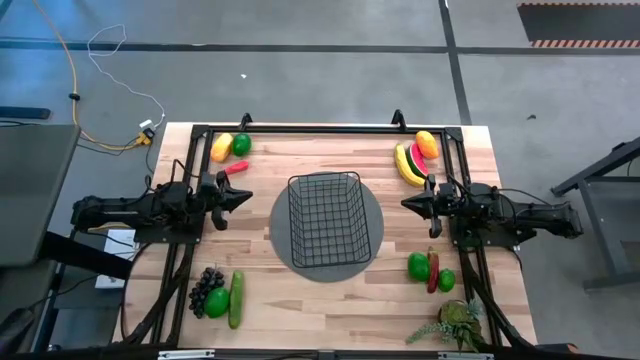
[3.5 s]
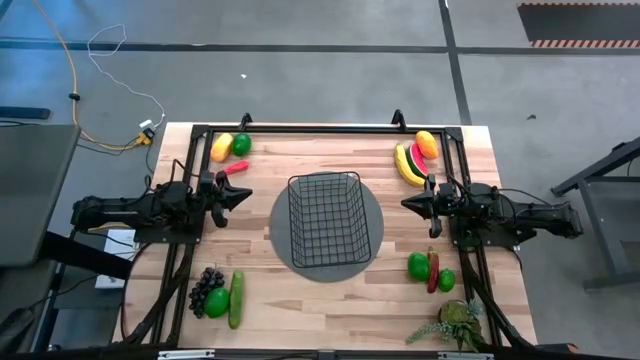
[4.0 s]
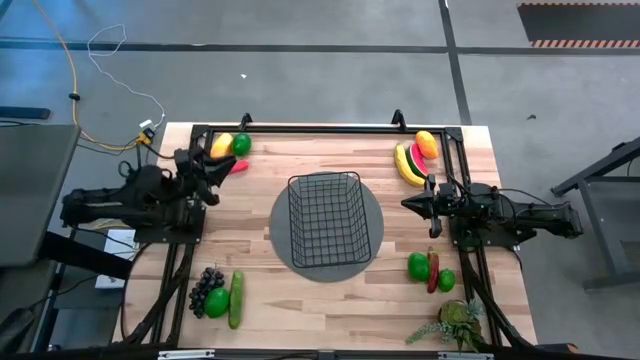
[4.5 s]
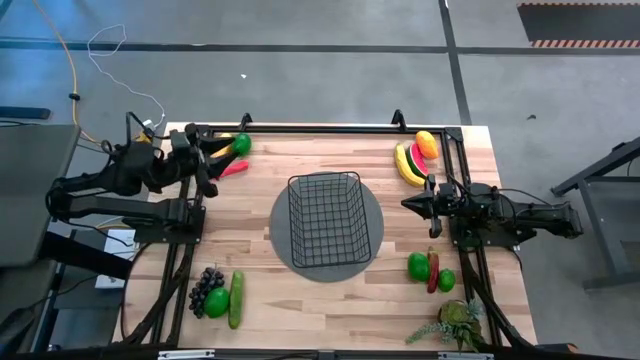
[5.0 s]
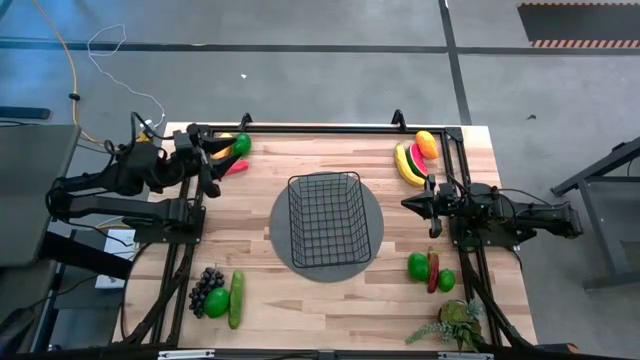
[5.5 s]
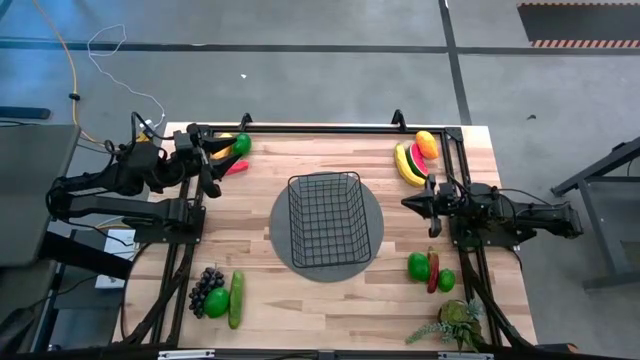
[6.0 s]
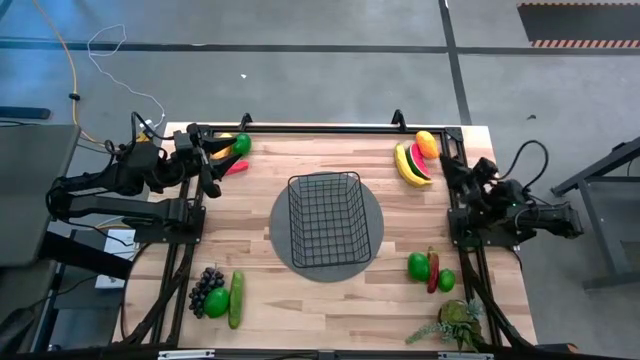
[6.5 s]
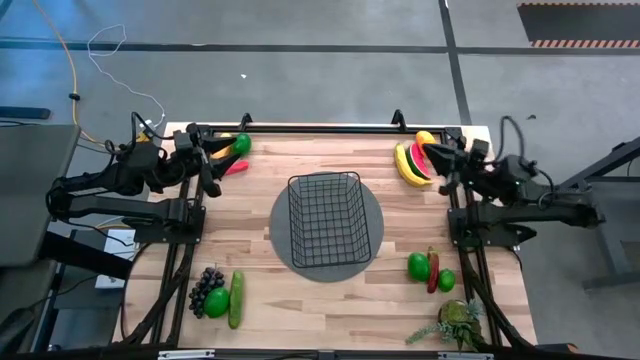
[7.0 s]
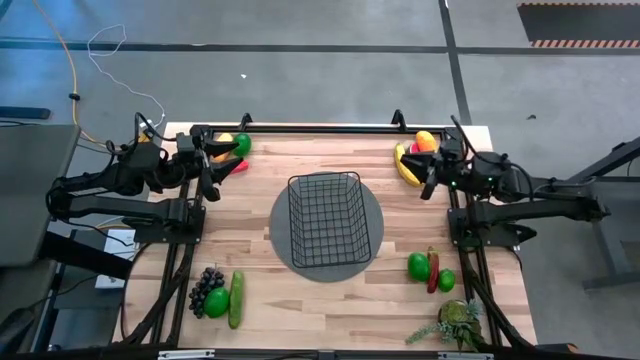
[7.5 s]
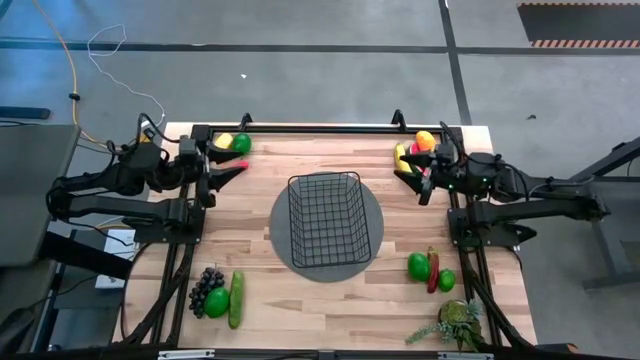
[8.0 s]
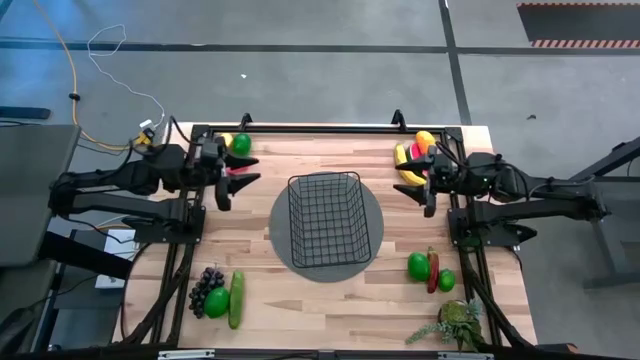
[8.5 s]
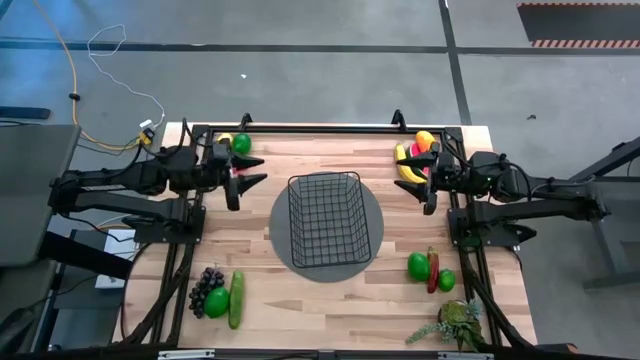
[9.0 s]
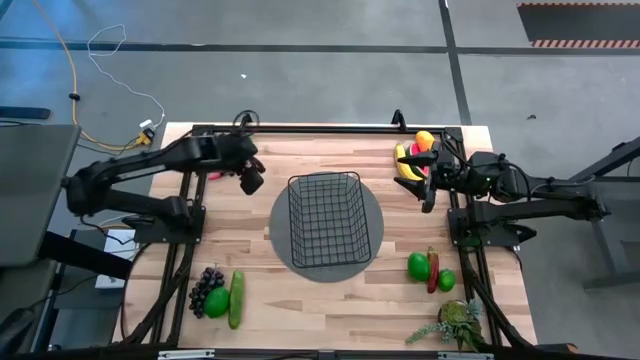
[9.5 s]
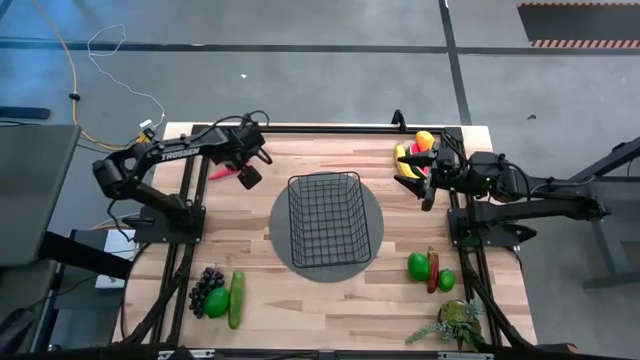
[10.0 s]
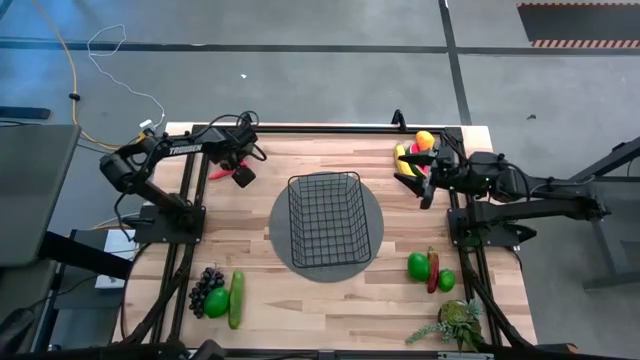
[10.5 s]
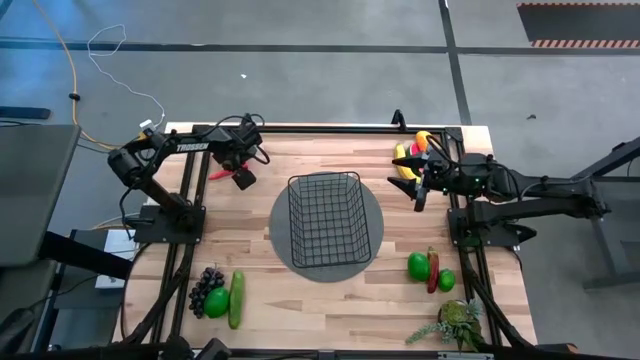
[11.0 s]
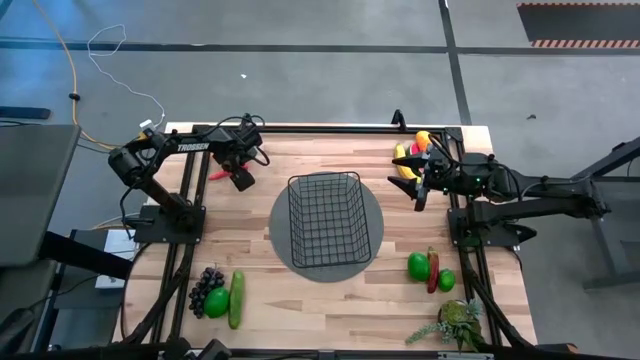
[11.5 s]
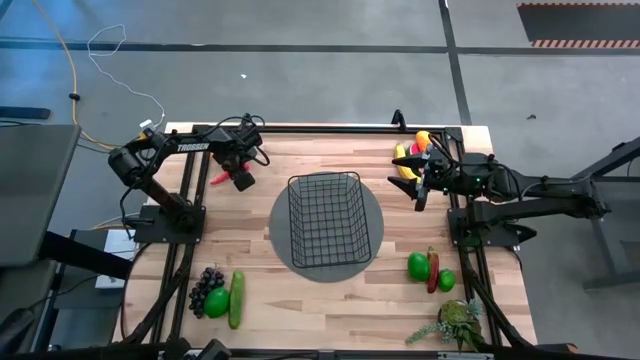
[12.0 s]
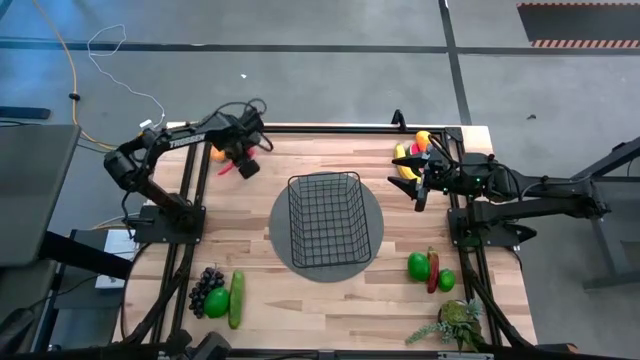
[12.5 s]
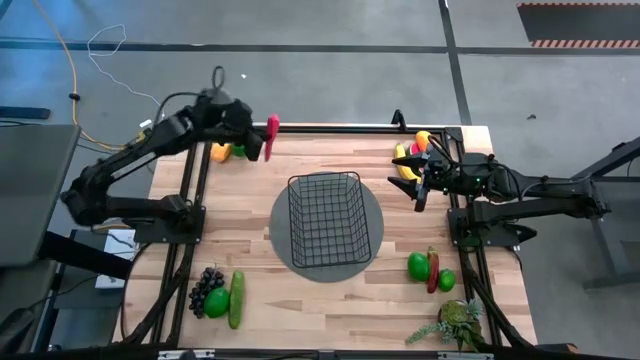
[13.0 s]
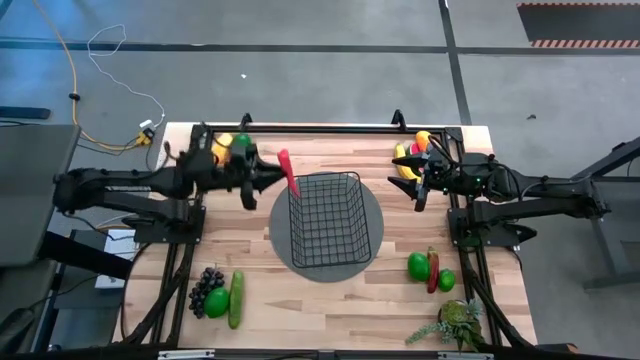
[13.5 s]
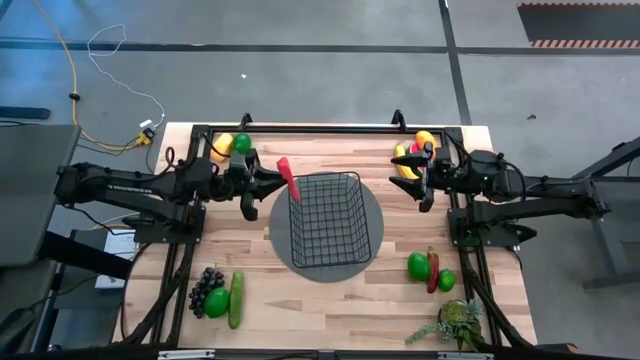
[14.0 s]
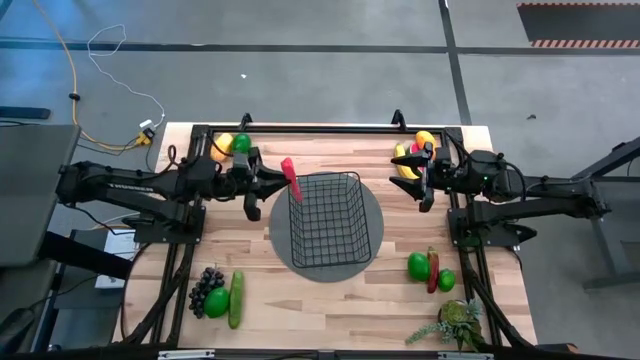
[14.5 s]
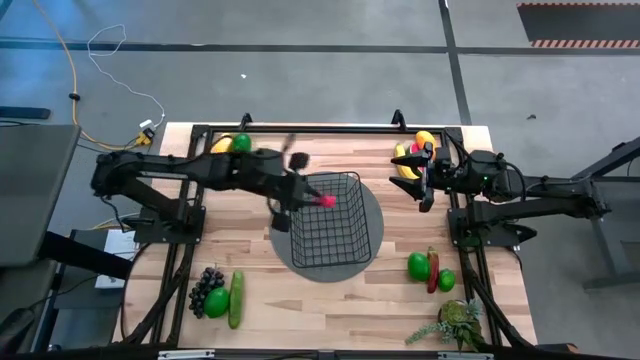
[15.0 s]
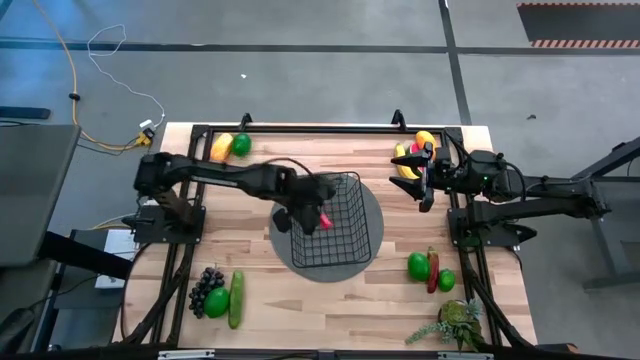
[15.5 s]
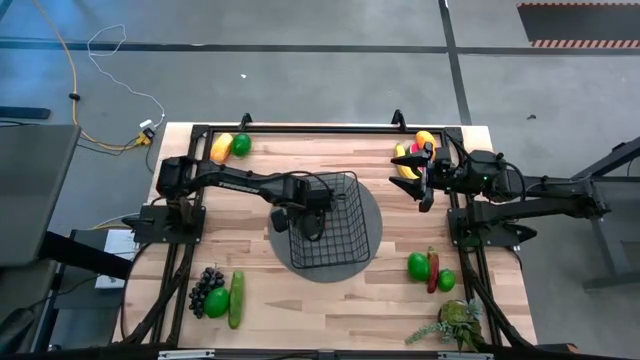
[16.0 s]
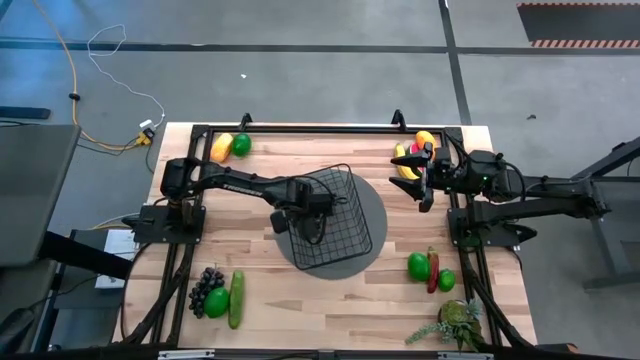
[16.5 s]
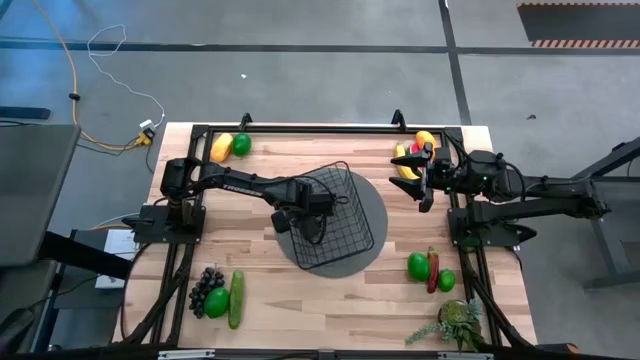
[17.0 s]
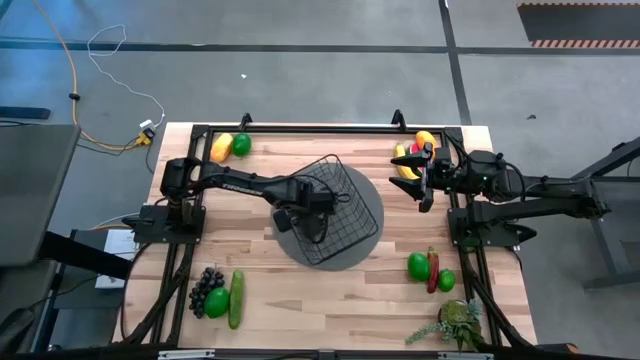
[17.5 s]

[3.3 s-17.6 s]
Task: Build produce basket
Put the red chili pepper into the black wire basket

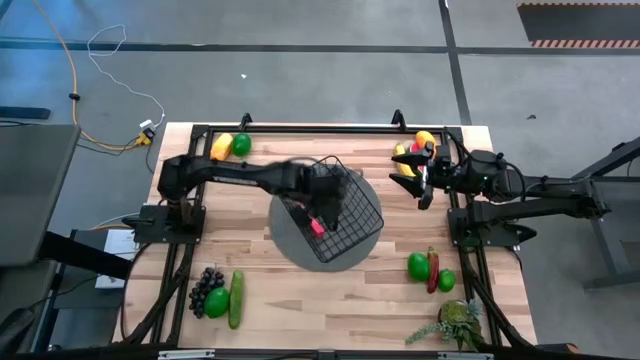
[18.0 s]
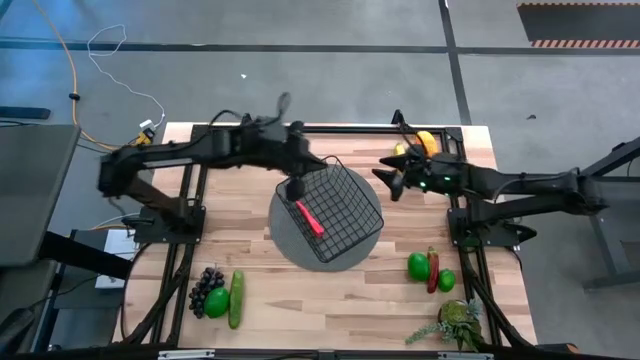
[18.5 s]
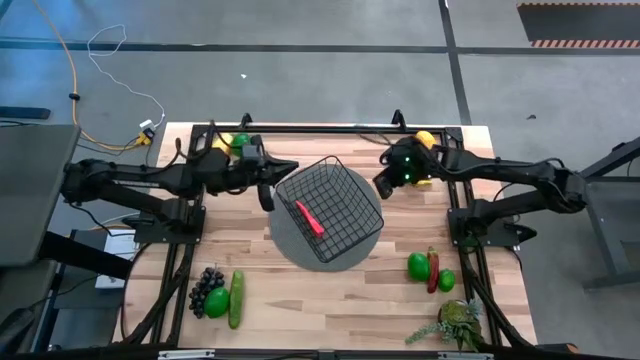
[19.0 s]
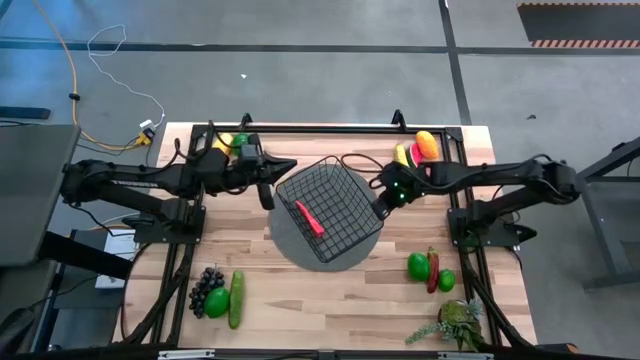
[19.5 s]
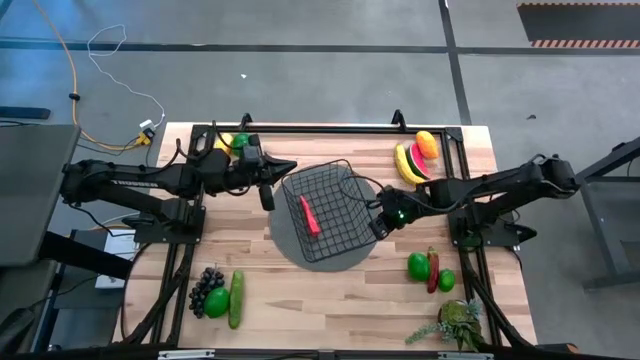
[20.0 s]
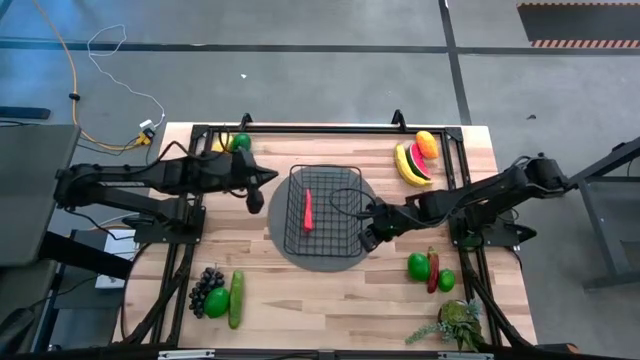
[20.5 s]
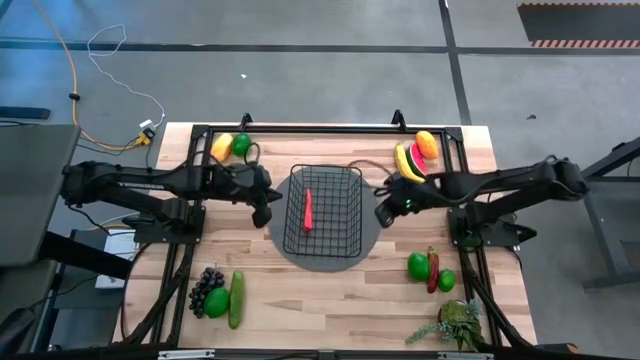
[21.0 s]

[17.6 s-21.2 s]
Adjust the black wire basket

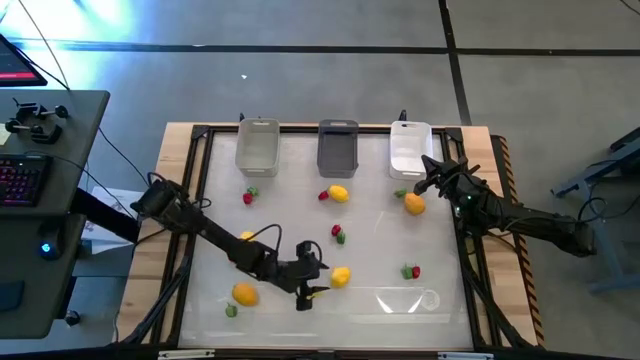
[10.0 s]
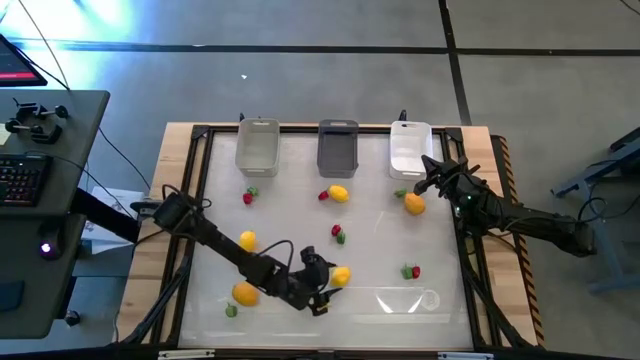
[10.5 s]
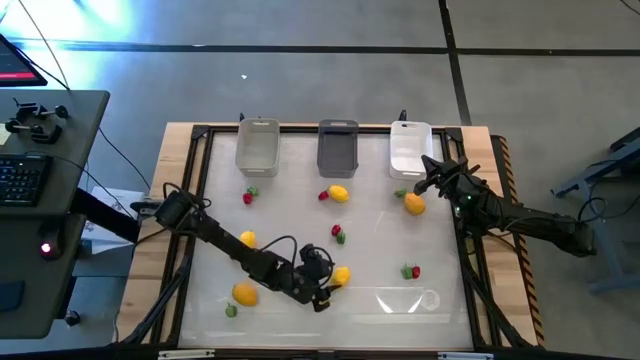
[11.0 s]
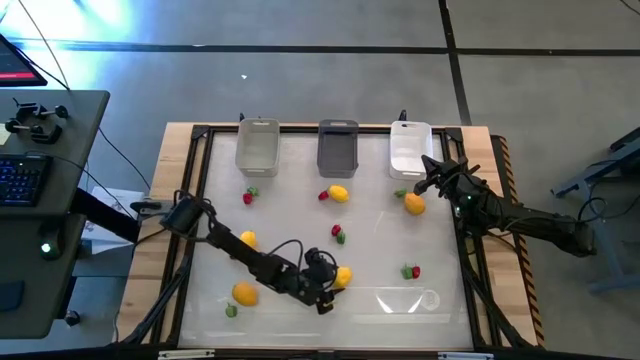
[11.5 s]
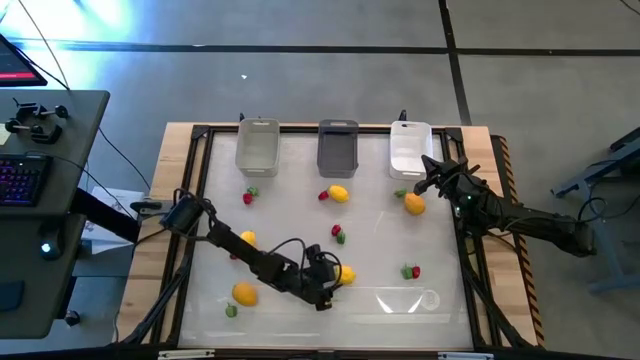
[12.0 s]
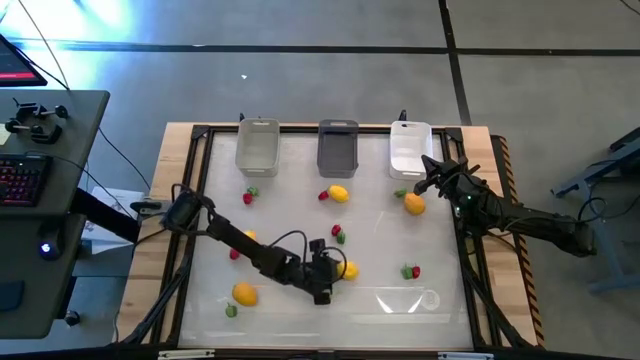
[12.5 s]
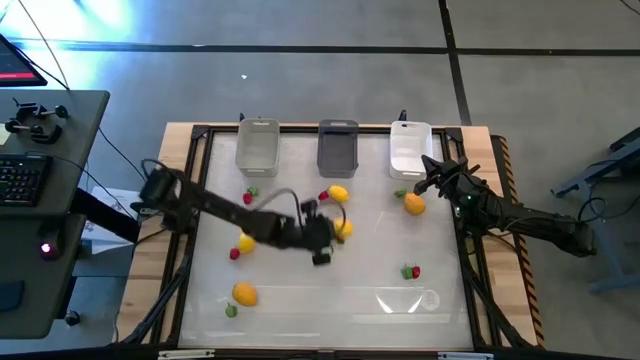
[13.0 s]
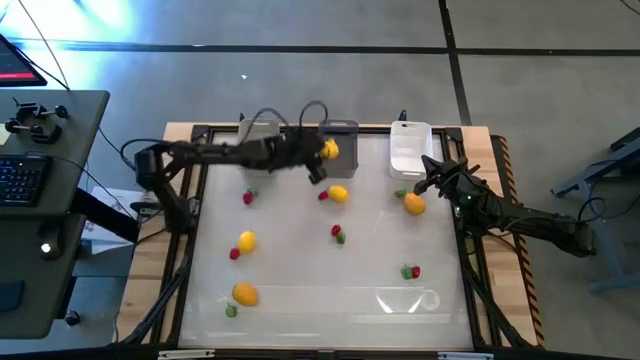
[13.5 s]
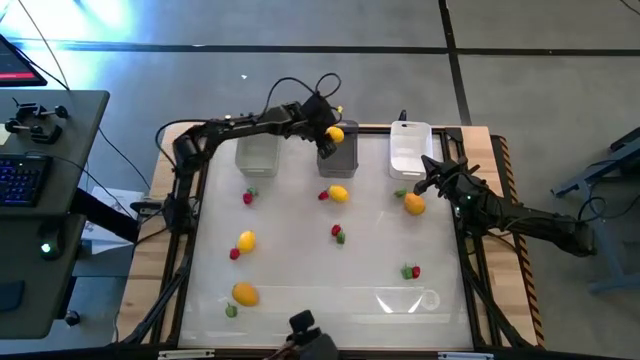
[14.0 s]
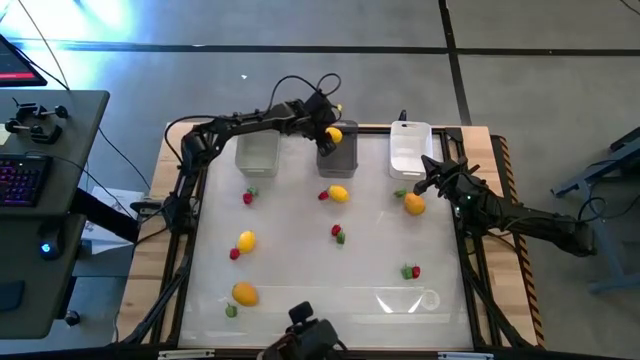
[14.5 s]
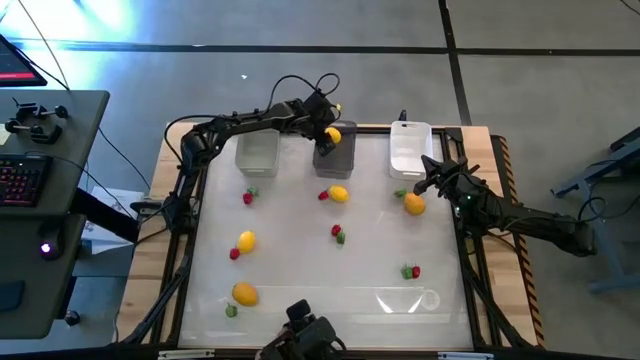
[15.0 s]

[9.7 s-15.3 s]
Task: Sort produce into baskets
Put the lemon into the black bin
